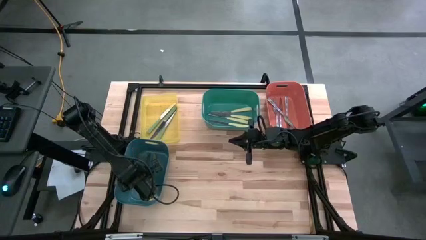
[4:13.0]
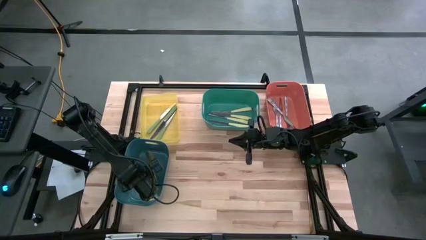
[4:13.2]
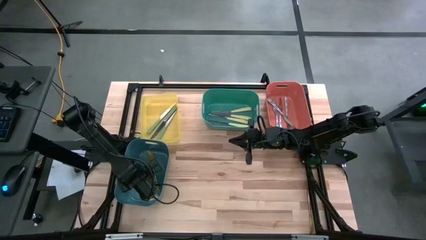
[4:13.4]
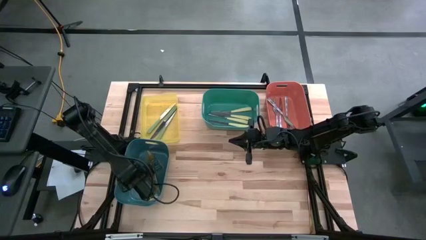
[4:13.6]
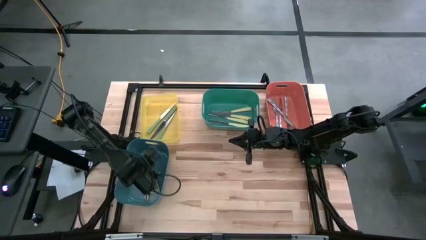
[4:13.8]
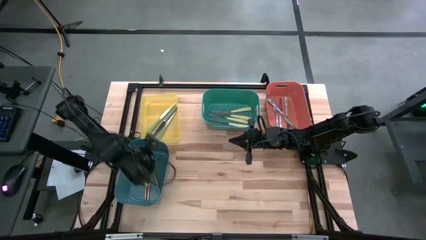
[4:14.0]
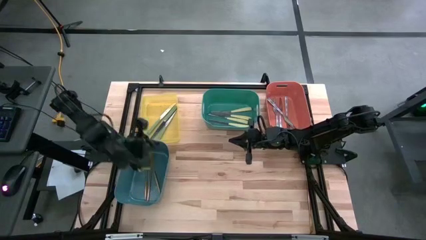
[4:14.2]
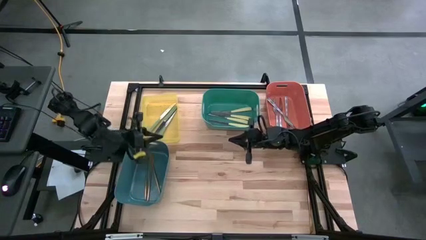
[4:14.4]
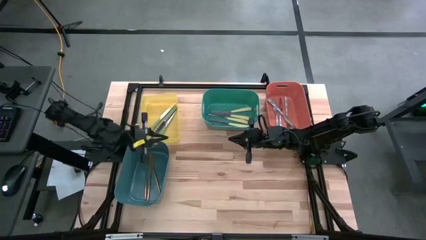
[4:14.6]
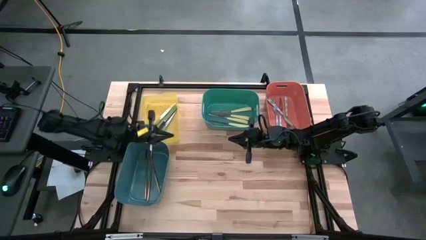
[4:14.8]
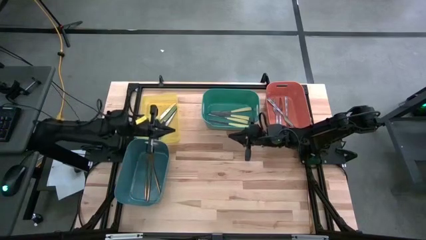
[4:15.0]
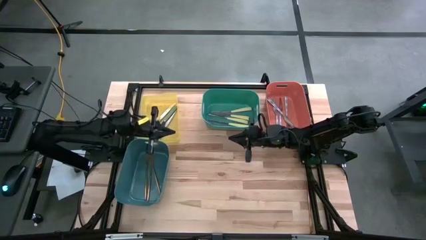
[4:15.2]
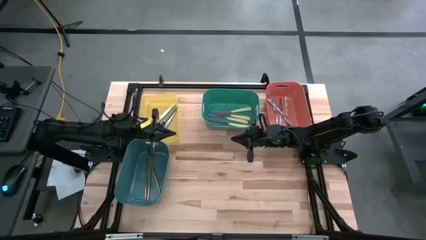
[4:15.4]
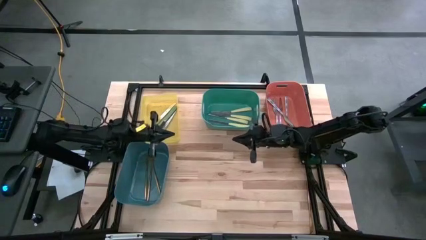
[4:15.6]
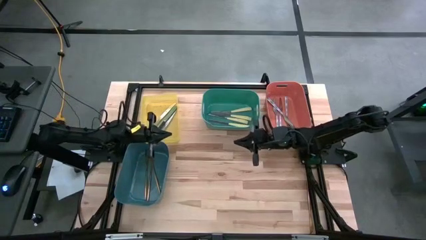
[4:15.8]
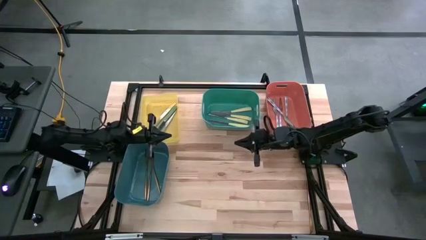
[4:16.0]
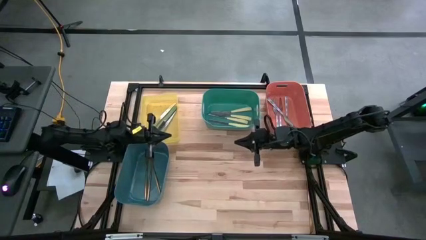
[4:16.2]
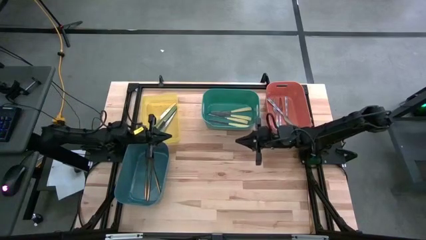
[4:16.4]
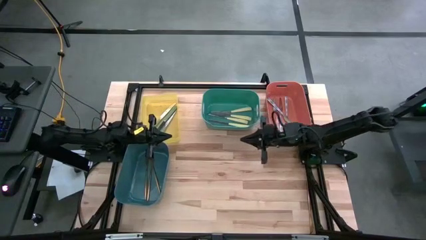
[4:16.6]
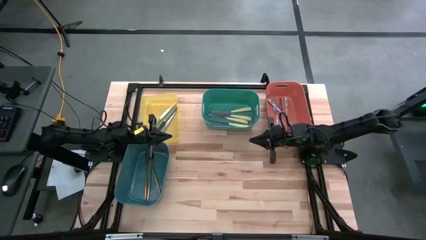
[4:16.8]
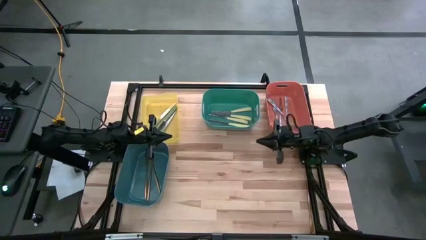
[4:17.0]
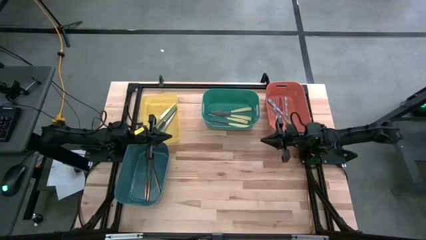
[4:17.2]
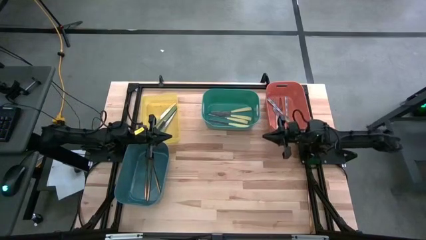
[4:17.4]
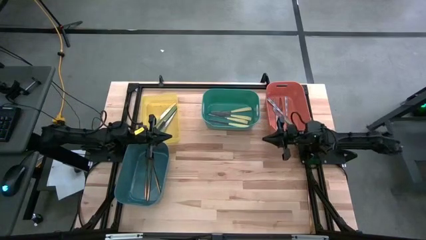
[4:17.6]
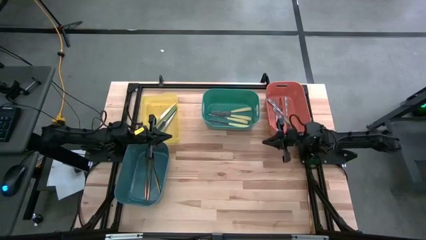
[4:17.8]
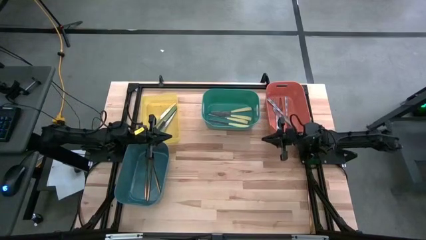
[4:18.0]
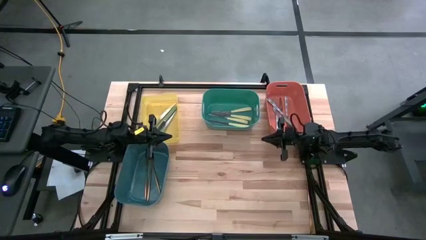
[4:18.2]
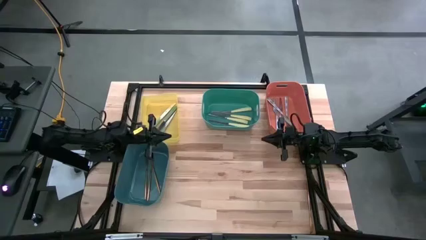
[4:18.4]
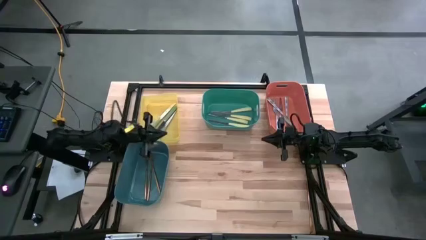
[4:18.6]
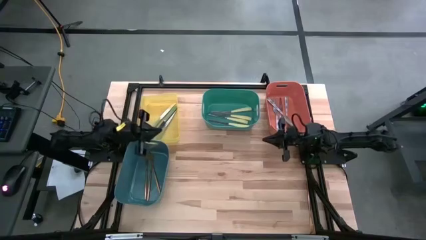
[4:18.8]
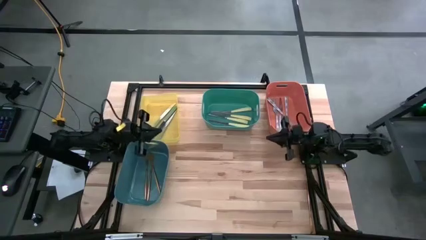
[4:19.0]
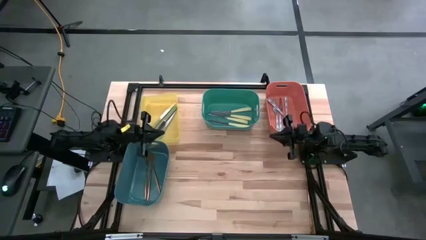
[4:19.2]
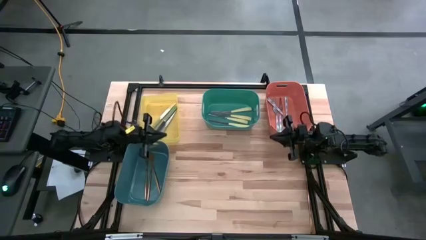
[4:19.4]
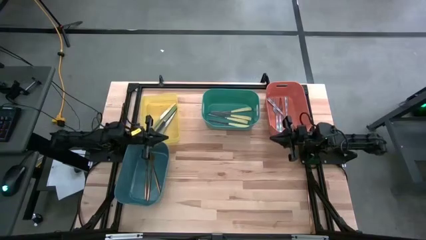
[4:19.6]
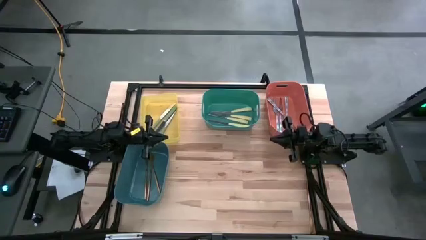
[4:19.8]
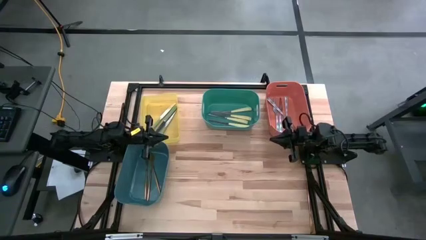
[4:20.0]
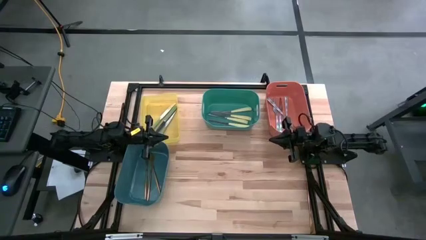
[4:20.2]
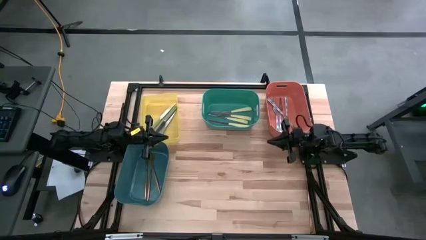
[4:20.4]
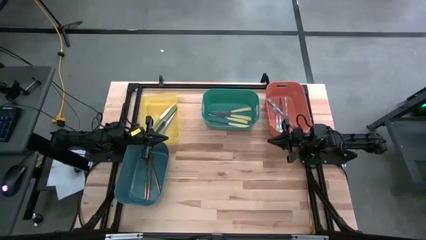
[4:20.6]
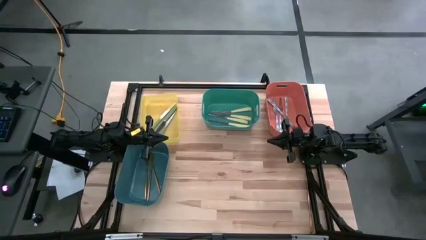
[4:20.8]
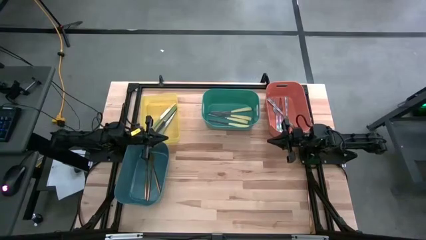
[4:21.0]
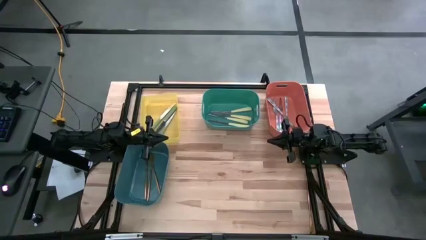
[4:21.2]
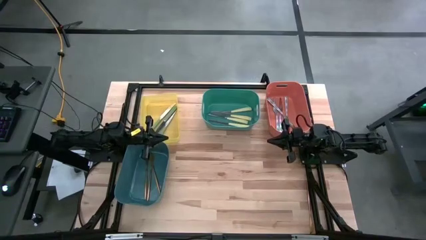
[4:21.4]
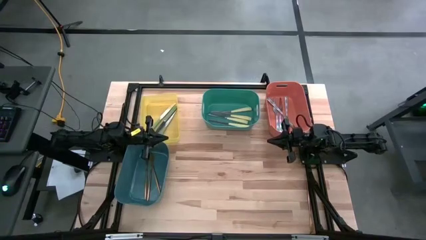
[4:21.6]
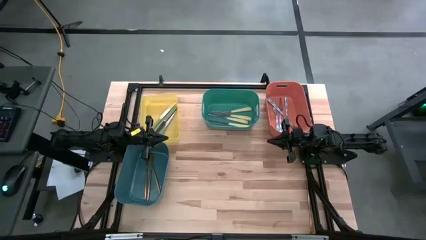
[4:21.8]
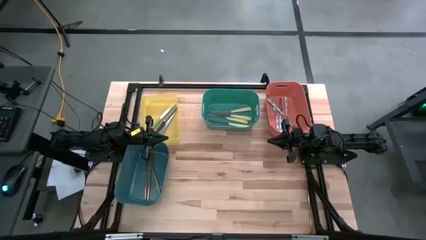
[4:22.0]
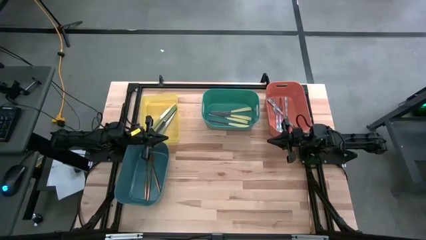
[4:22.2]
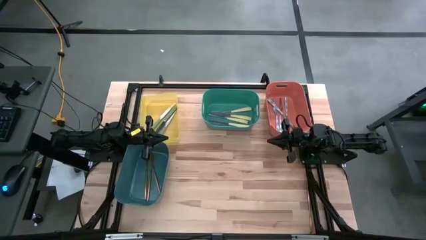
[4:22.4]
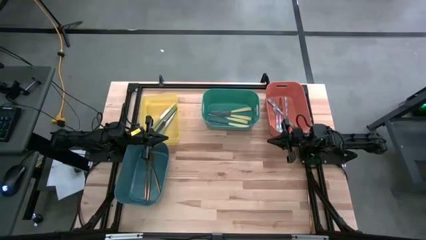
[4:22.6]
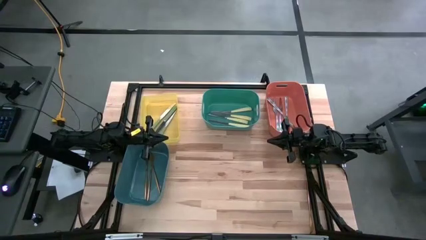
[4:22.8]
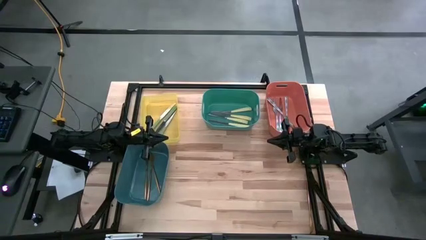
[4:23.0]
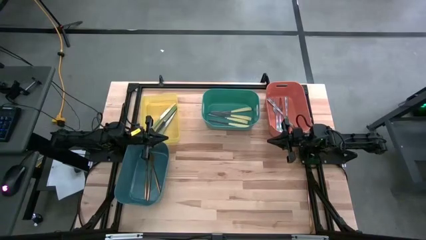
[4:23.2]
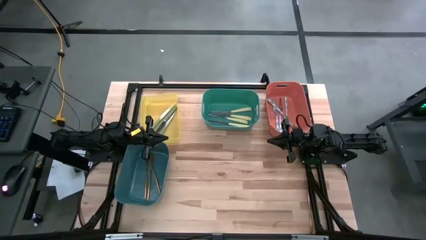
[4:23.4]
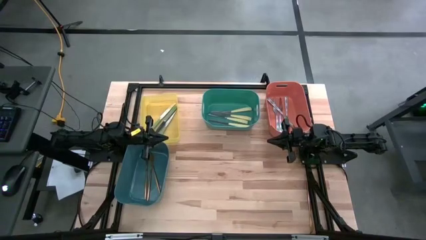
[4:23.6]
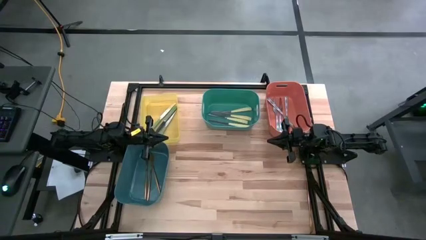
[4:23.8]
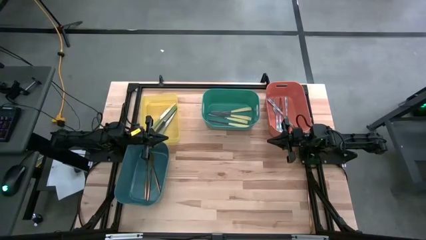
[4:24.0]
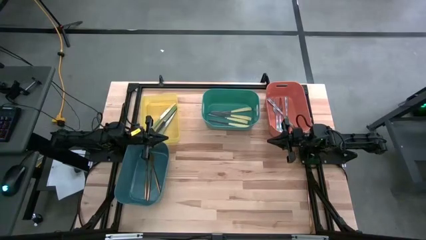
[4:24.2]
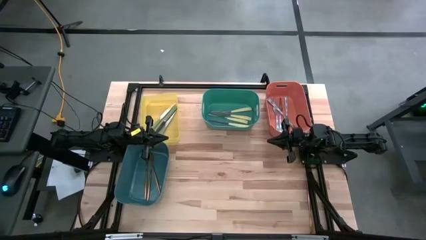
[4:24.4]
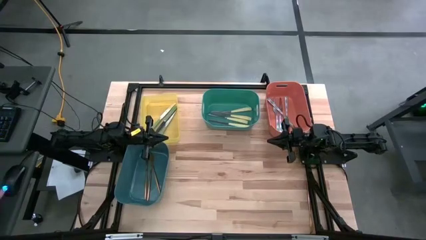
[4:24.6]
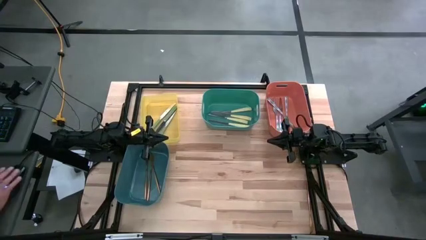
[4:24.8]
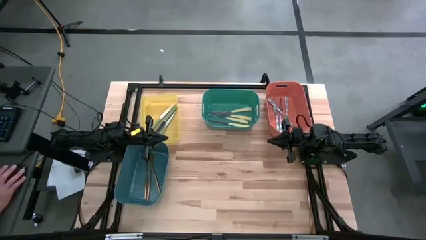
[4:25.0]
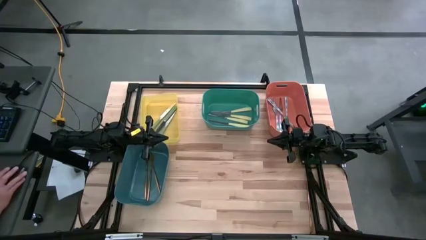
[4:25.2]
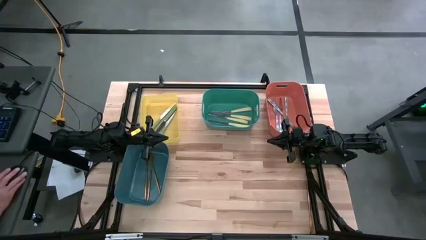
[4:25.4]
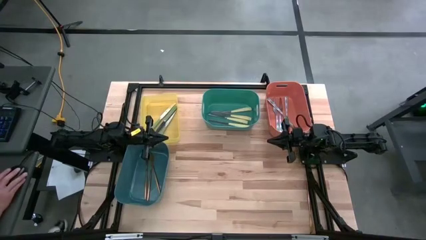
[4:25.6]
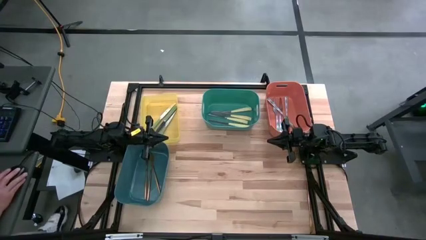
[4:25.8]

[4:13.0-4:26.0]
Task: Sort silverware by color (type)
Return to Home Position
